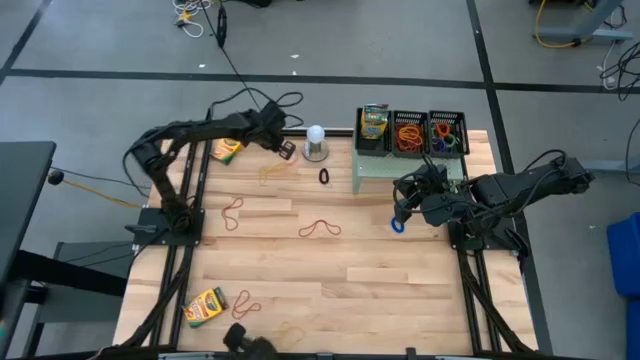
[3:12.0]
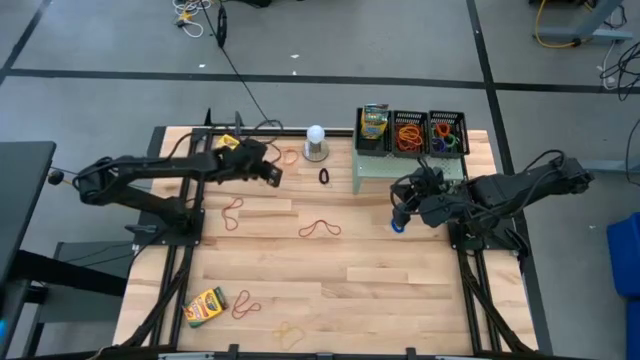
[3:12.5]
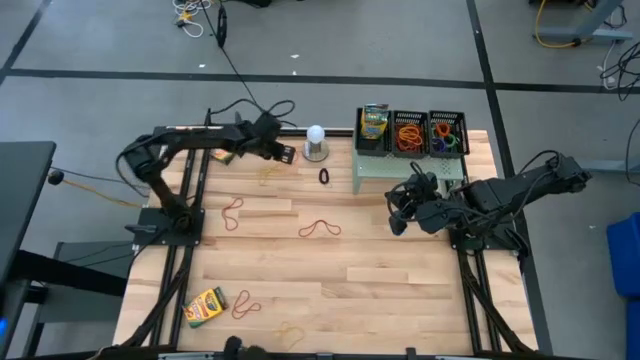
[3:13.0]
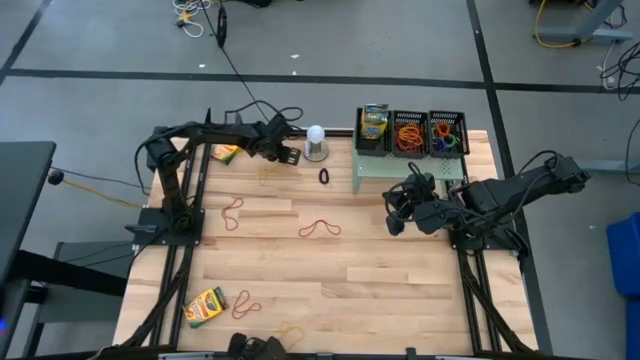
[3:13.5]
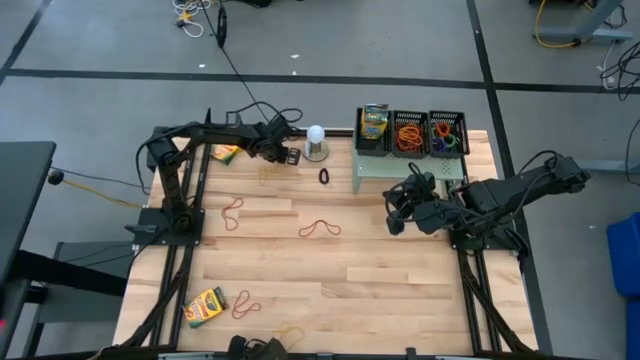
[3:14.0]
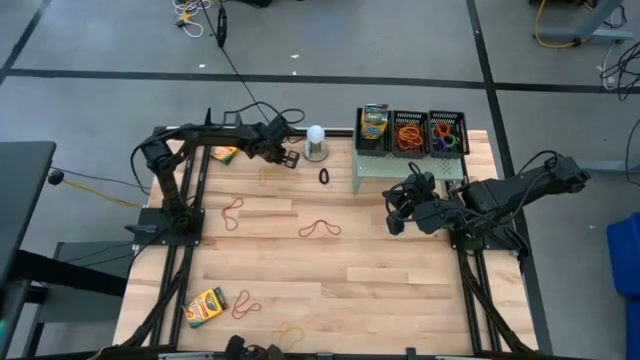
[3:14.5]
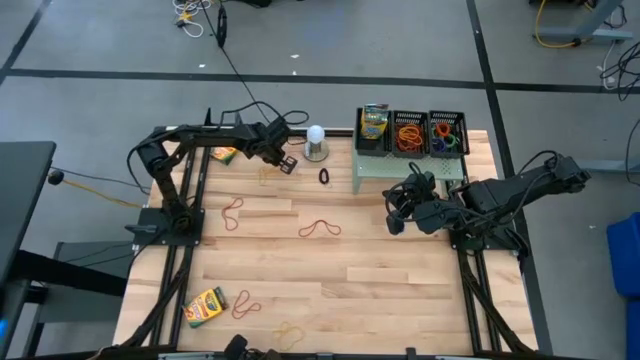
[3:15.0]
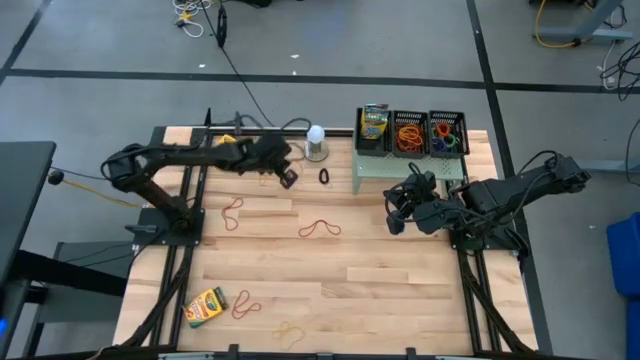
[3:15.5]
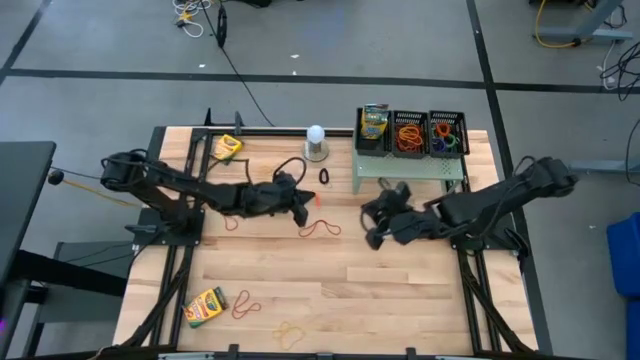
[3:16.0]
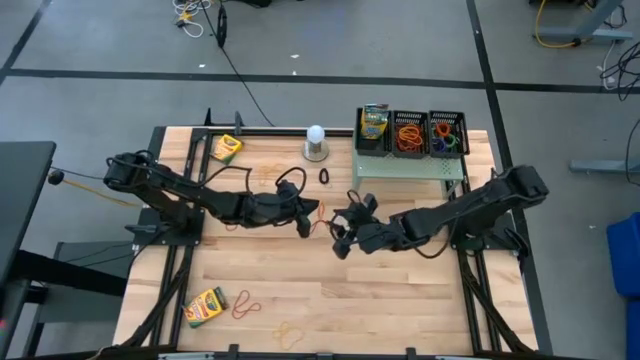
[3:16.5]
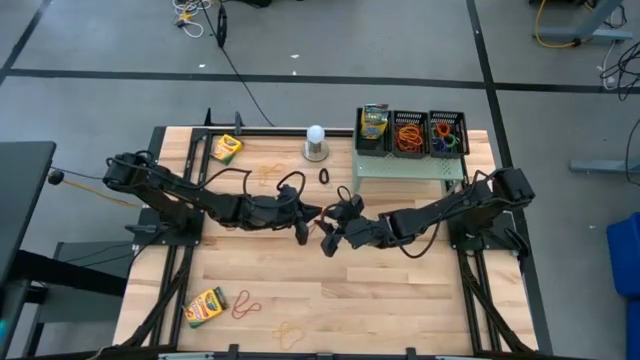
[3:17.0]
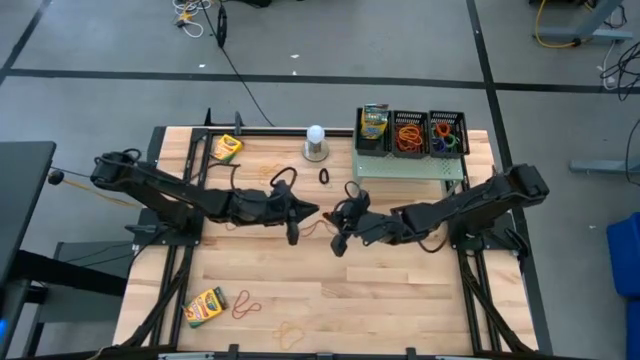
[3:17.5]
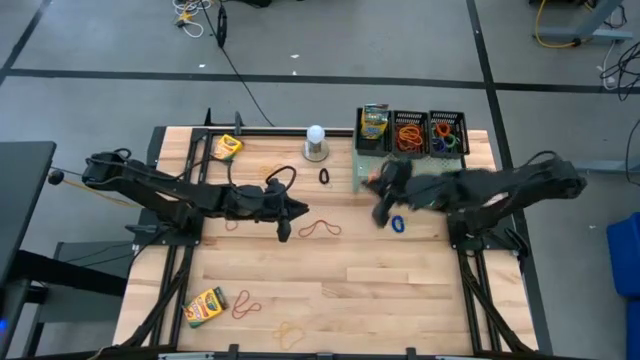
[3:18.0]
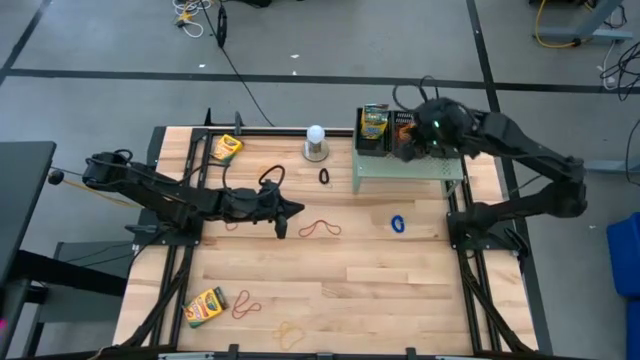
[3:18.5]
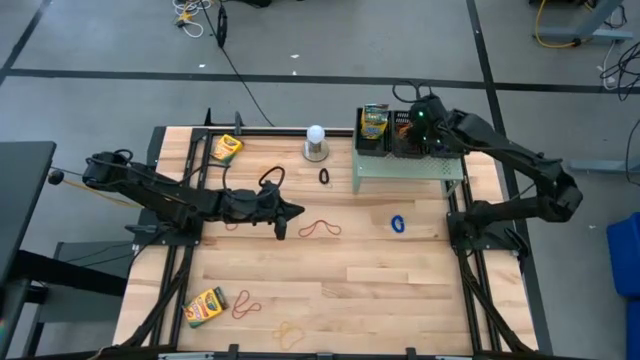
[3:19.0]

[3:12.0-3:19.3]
Task: Pick & Place Office Desk Supplies
Put the orange rubber band into the middle basket on the shelf

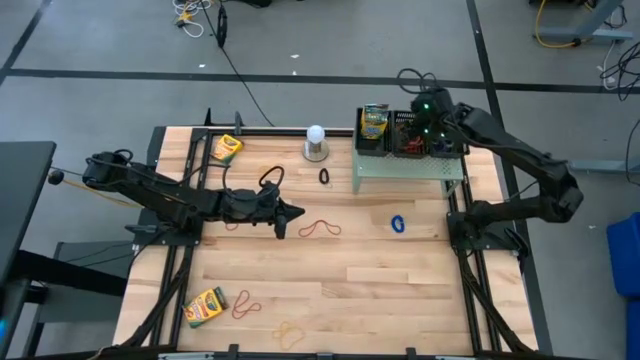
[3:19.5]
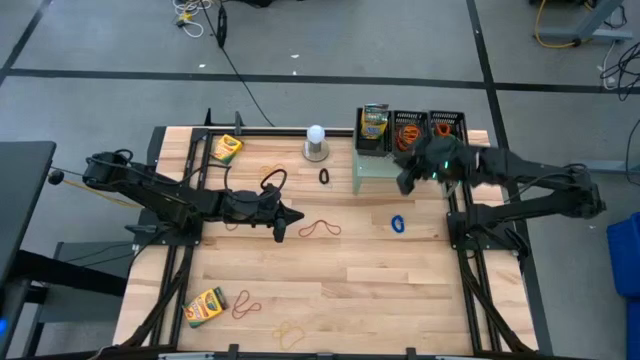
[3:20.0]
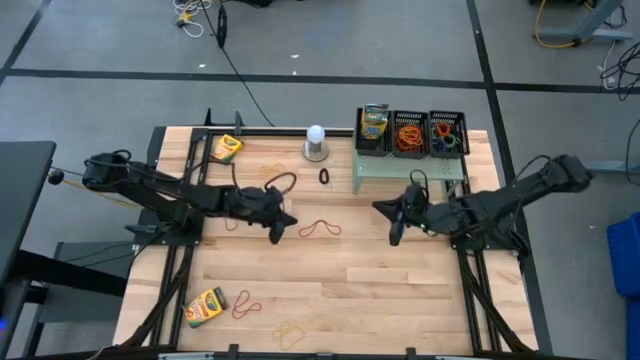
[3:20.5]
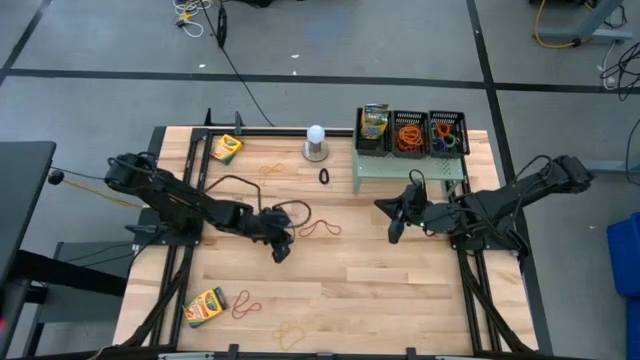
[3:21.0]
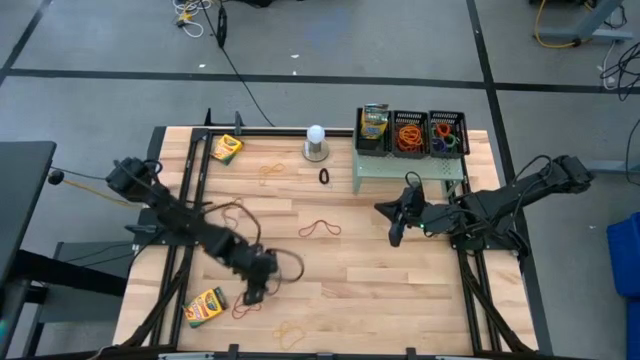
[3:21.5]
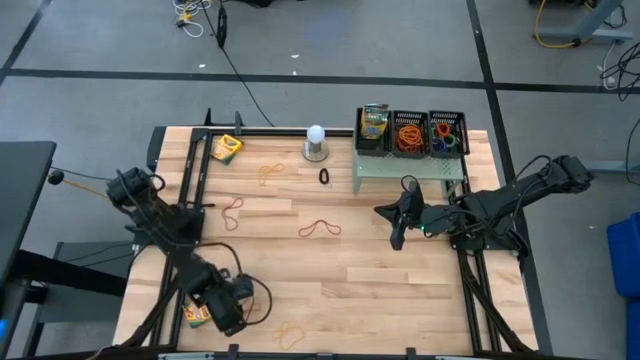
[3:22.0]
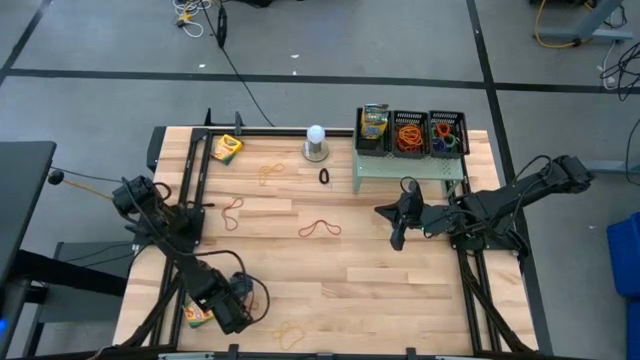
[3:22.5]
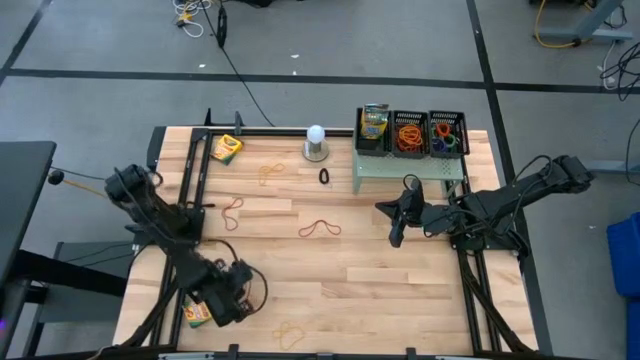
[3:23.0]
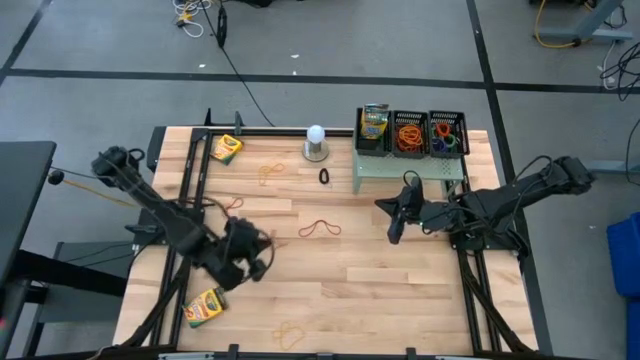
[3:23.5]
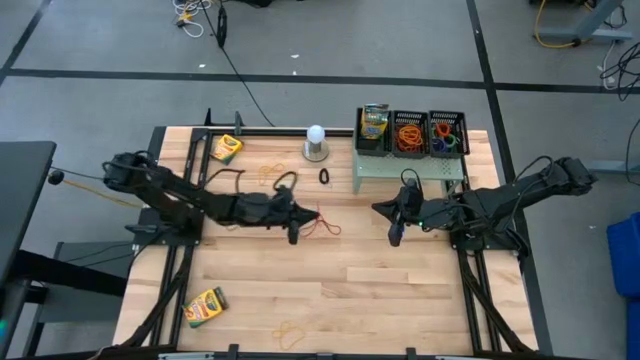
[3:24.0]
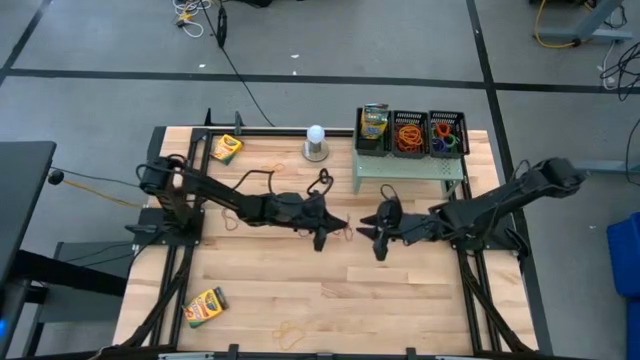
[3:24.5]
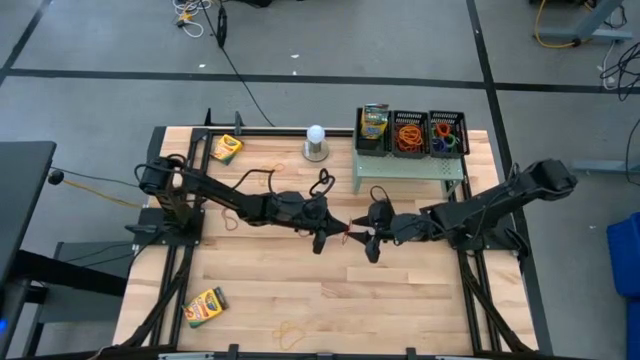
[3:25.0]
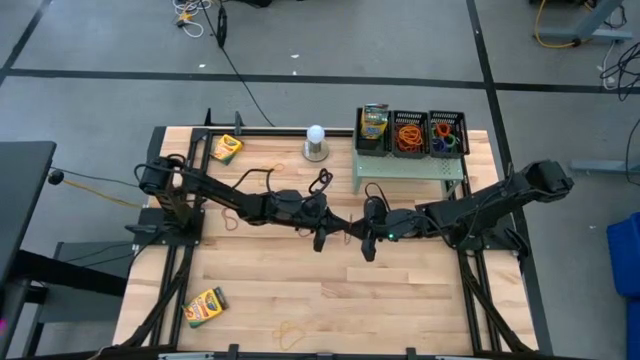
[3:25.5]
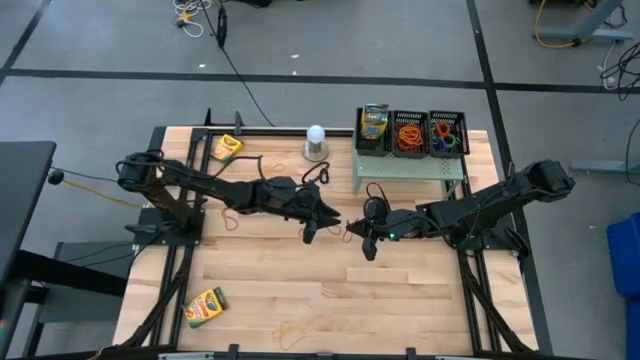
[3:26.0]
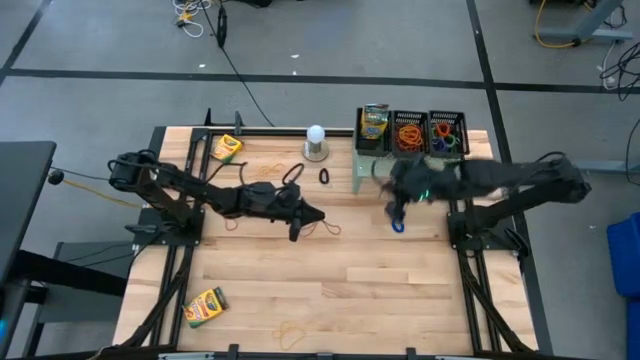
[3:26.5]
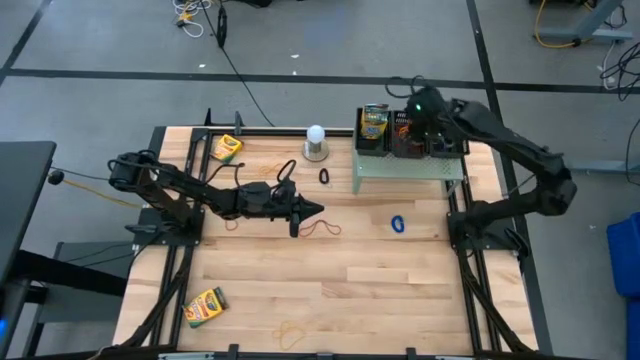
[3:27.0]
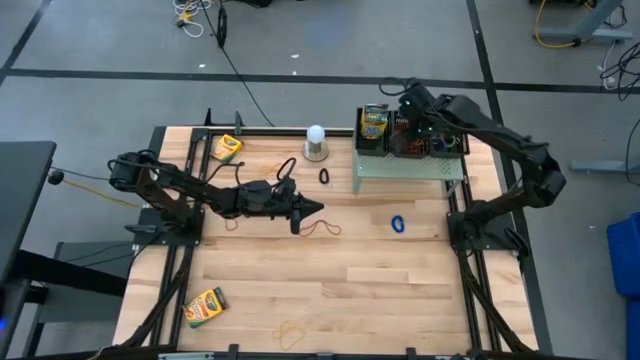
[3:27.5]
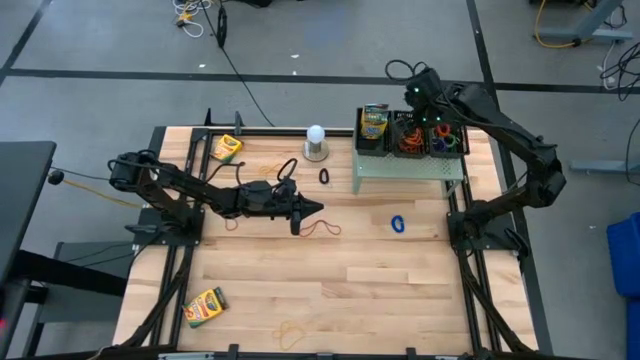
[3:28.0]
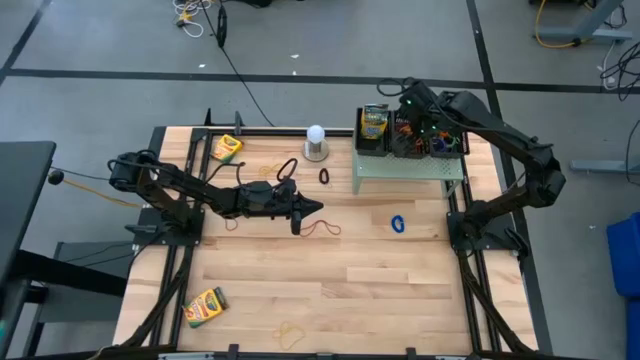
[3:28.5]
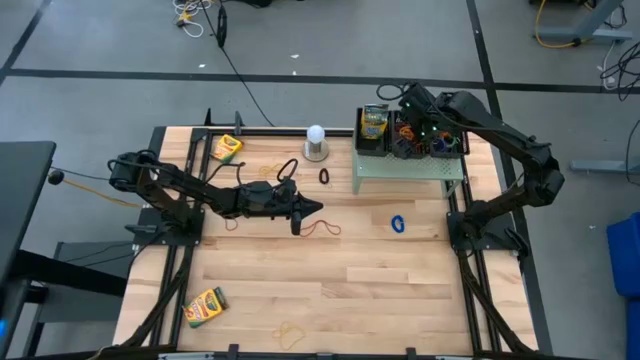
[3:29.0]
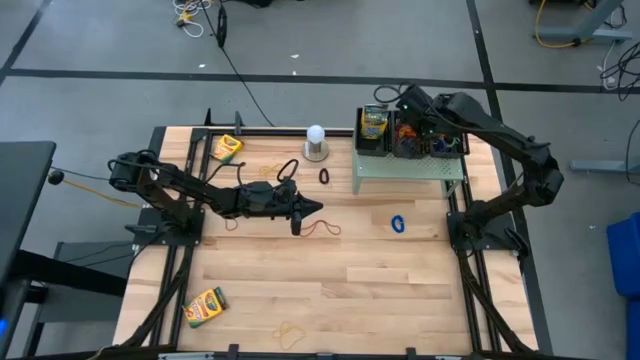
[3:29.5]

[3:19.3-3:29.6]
Put the bottom red rubber band into the middle basket on the shelf

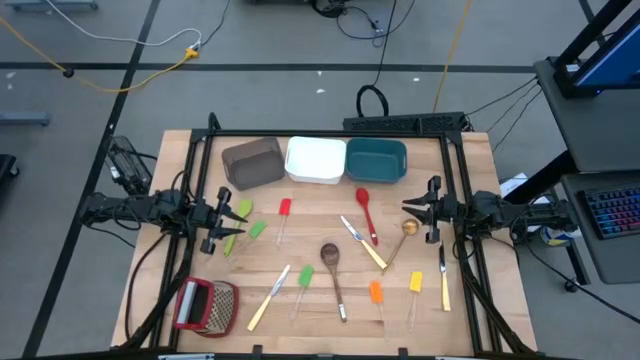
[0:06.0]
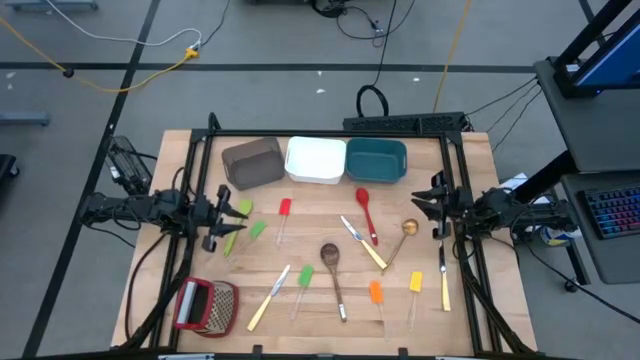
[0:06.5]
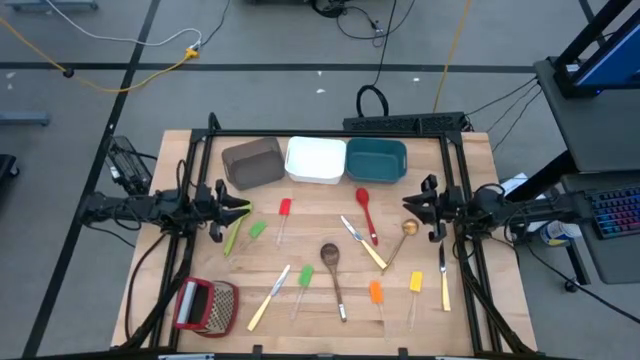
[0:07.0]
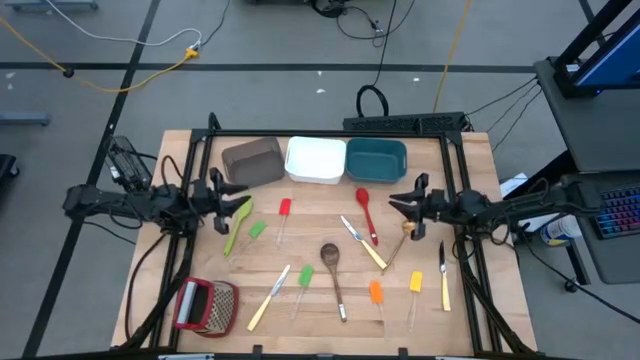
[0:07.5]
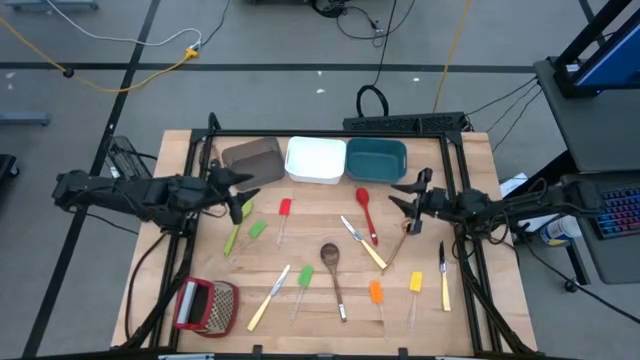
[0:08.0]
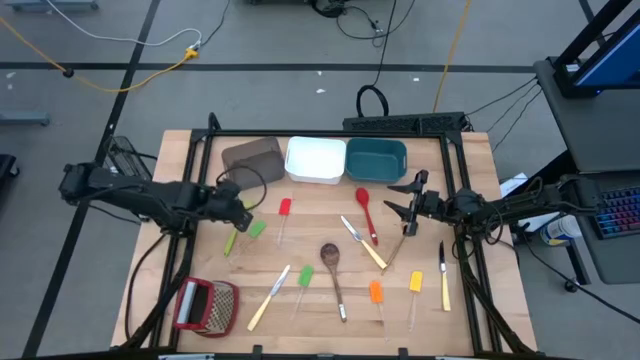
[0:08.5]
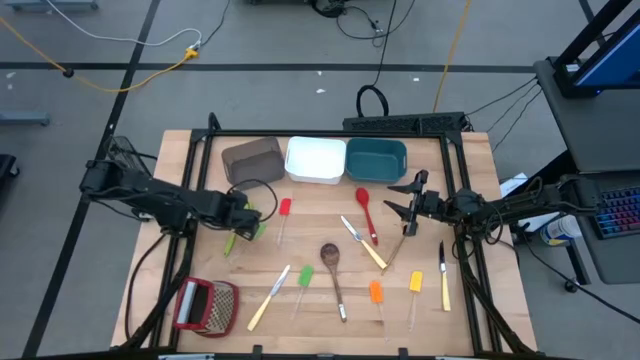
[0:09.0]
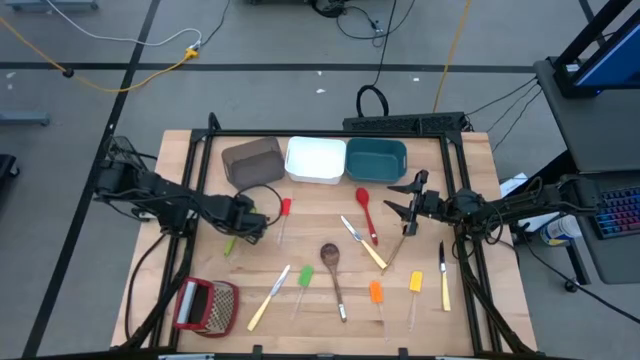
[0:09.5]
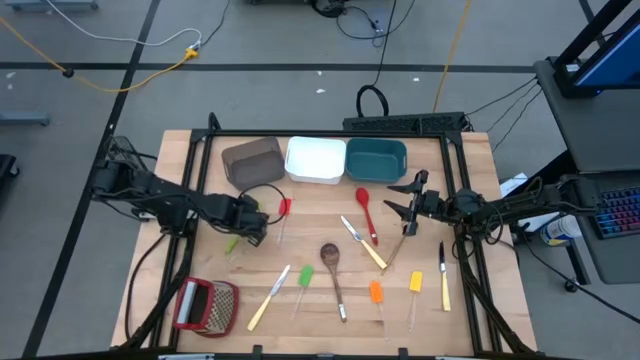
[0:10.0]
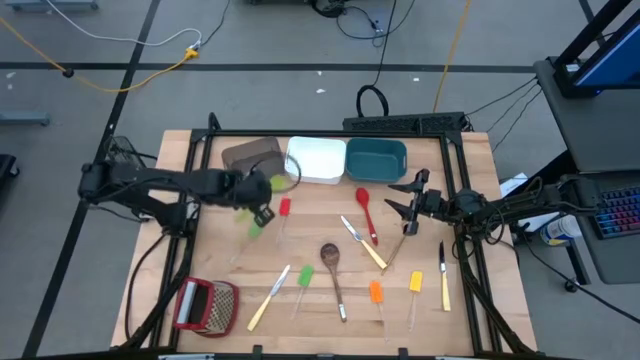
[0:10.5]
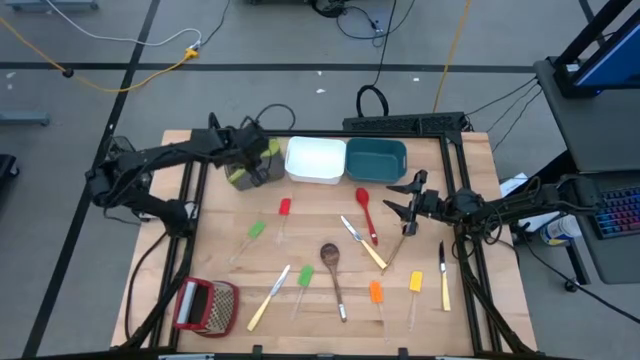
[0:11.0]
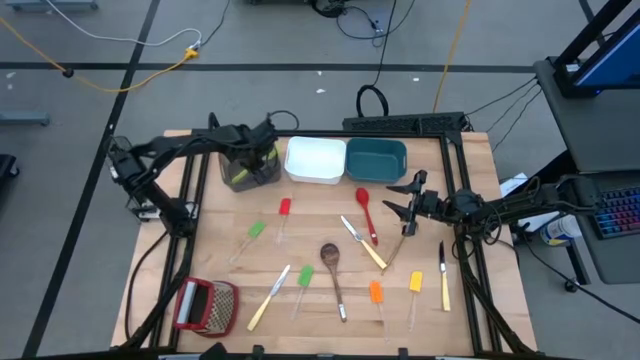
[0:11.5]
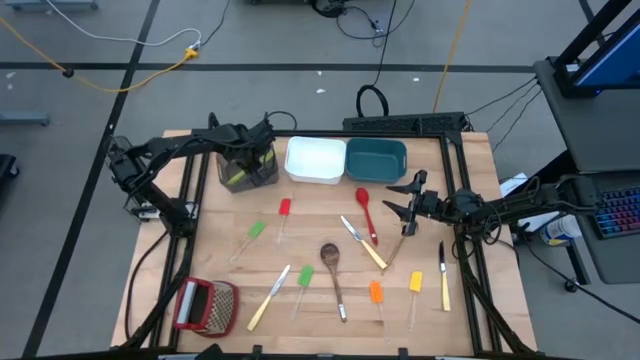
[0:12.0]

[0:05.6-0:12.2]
Task: Pick & Place Kitchen Items
Put the green serving spoon into the black bin
